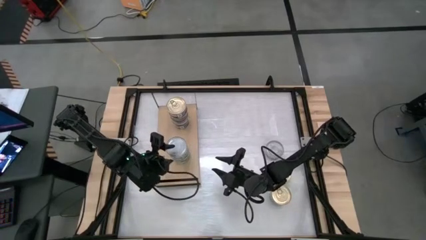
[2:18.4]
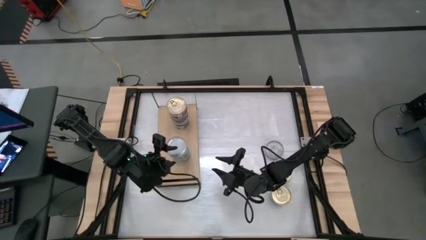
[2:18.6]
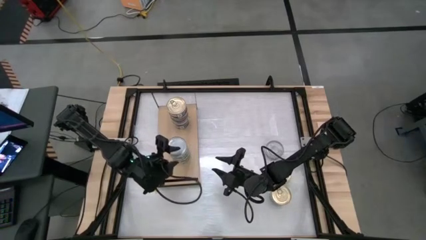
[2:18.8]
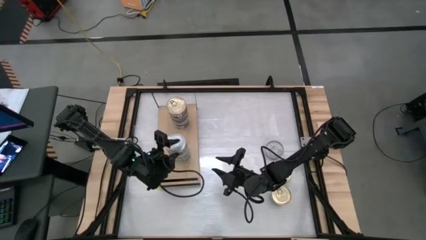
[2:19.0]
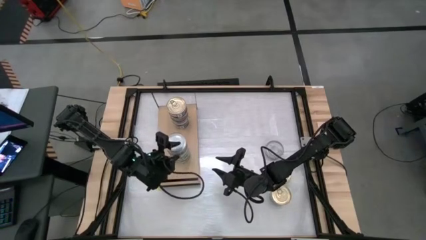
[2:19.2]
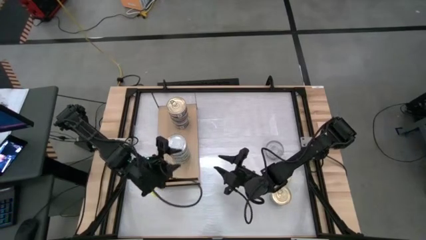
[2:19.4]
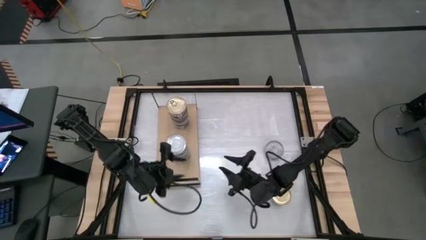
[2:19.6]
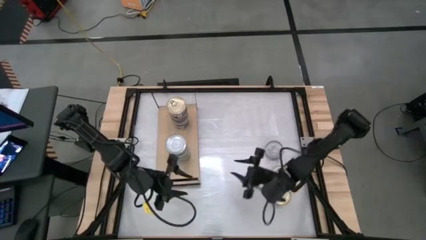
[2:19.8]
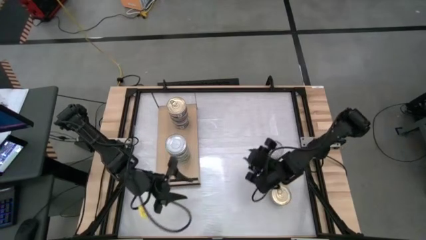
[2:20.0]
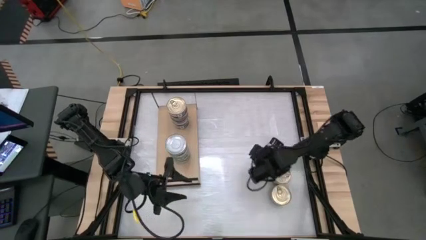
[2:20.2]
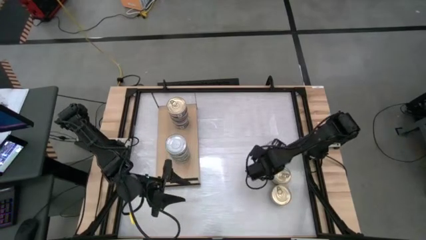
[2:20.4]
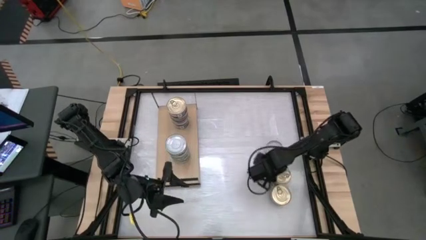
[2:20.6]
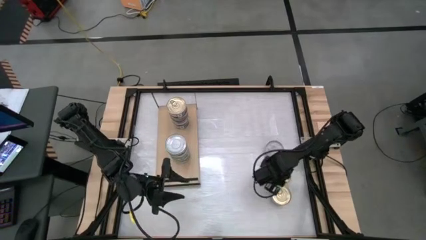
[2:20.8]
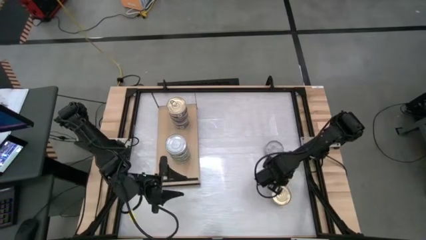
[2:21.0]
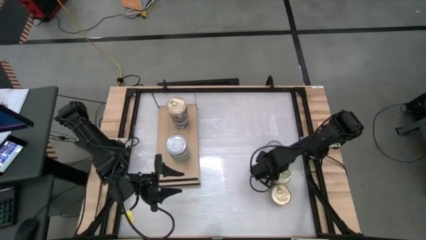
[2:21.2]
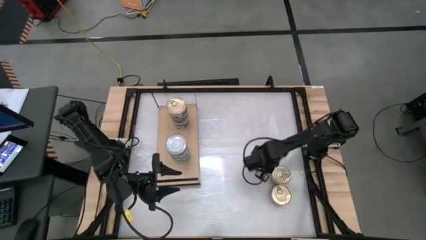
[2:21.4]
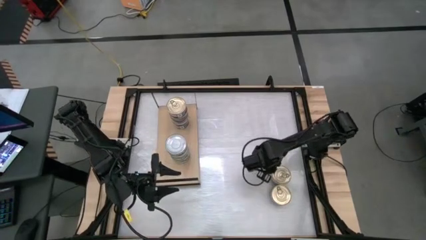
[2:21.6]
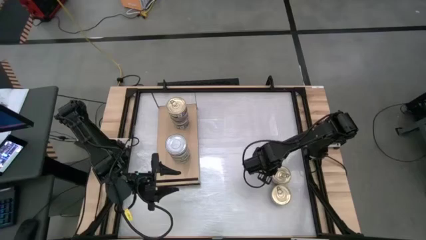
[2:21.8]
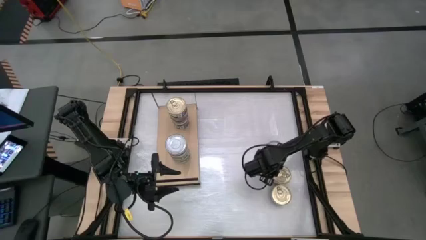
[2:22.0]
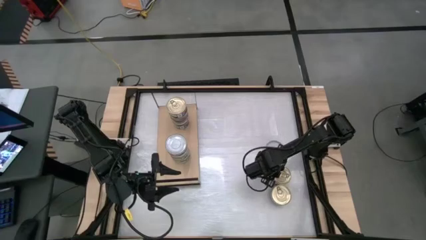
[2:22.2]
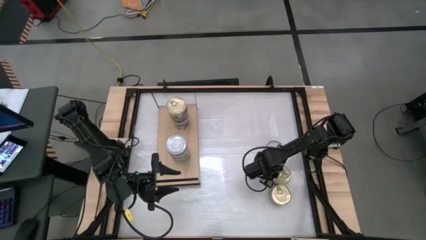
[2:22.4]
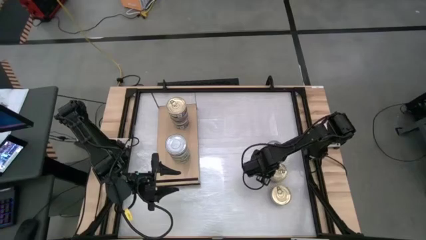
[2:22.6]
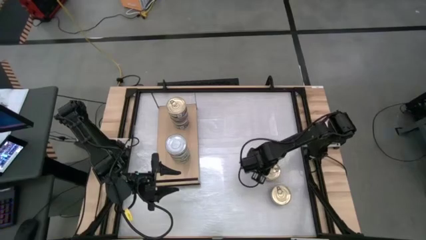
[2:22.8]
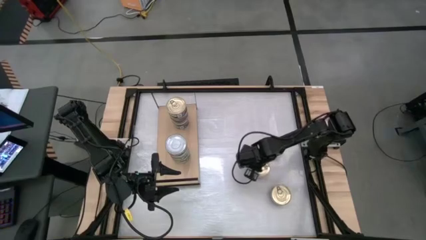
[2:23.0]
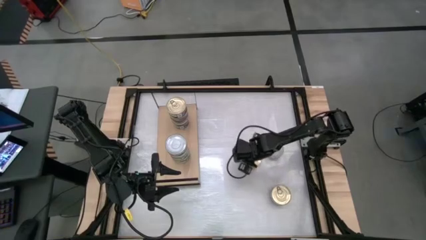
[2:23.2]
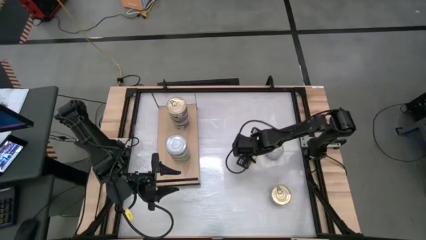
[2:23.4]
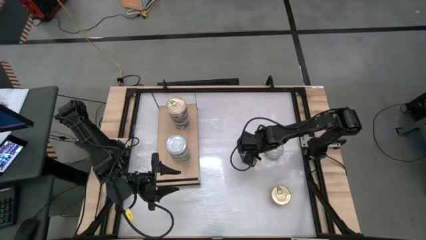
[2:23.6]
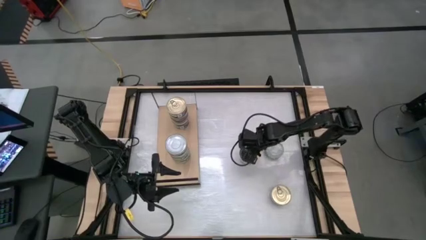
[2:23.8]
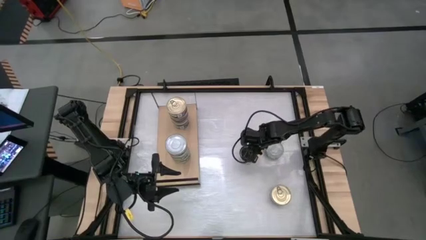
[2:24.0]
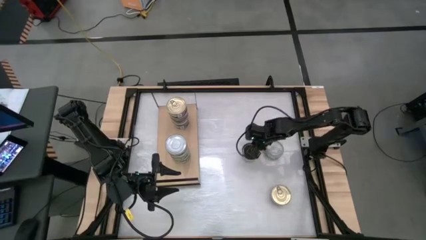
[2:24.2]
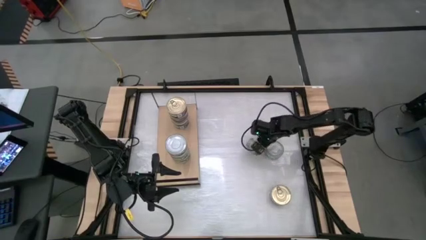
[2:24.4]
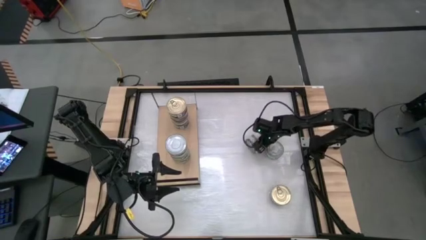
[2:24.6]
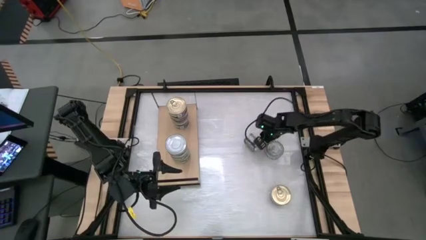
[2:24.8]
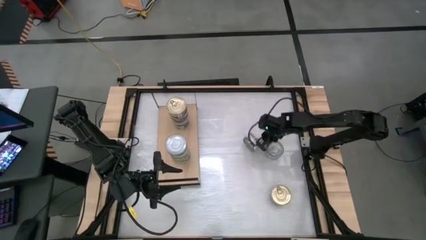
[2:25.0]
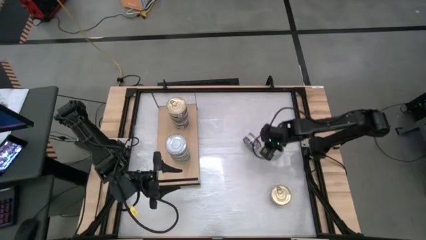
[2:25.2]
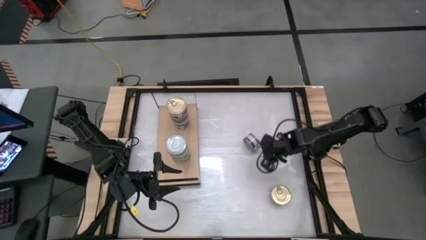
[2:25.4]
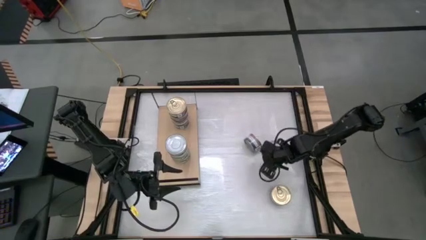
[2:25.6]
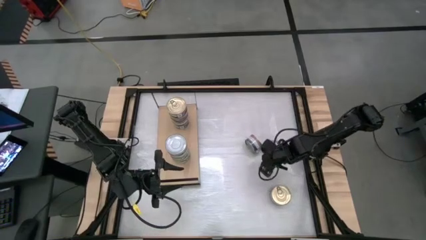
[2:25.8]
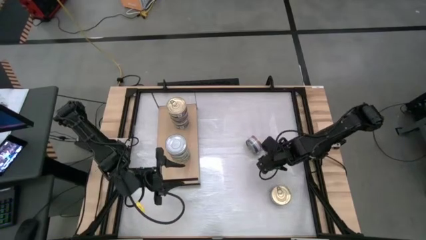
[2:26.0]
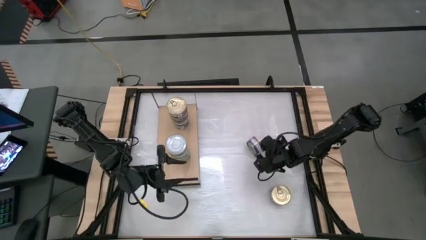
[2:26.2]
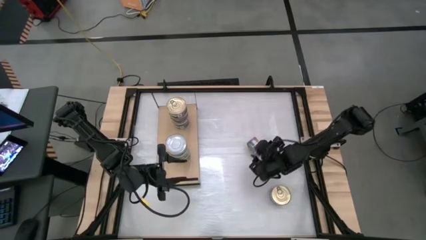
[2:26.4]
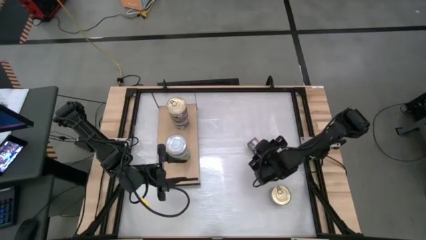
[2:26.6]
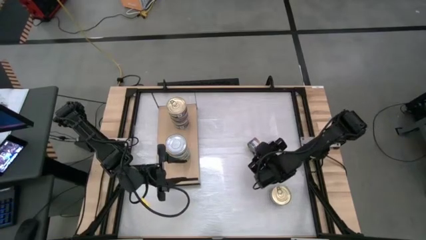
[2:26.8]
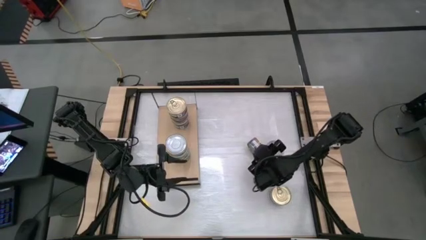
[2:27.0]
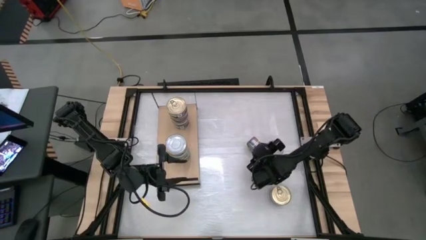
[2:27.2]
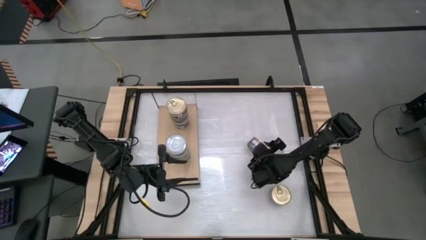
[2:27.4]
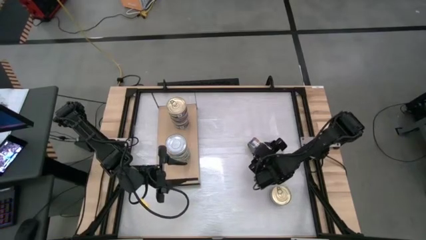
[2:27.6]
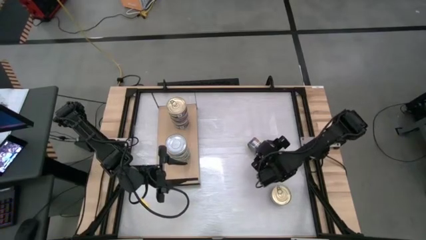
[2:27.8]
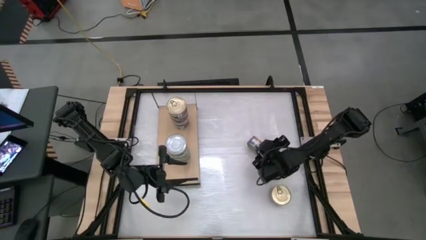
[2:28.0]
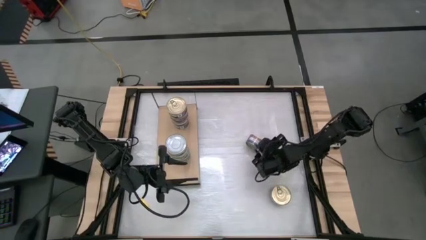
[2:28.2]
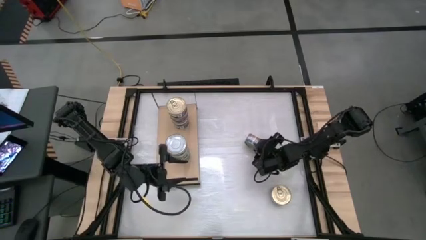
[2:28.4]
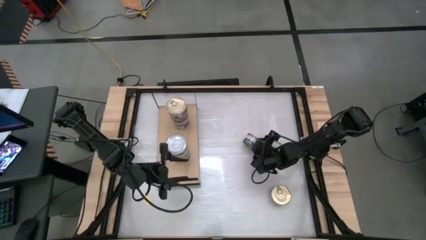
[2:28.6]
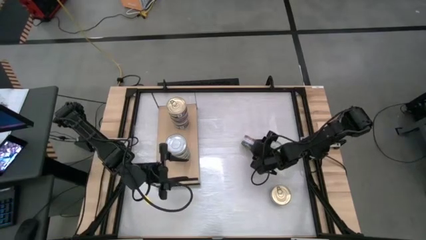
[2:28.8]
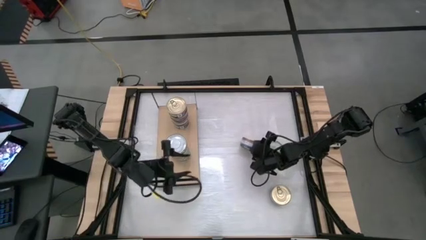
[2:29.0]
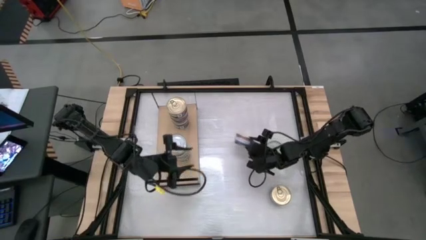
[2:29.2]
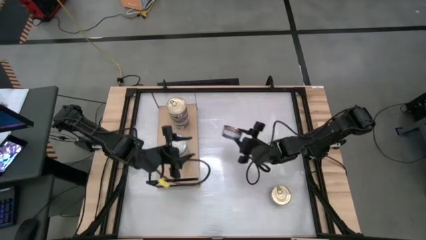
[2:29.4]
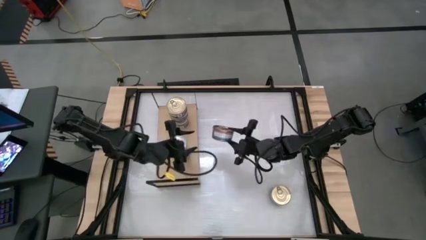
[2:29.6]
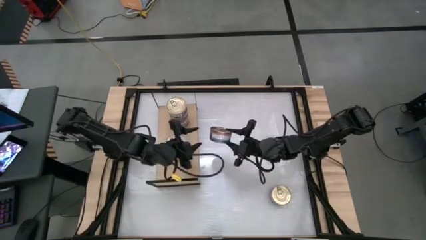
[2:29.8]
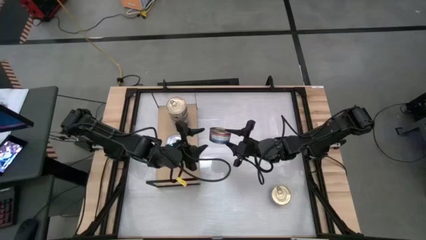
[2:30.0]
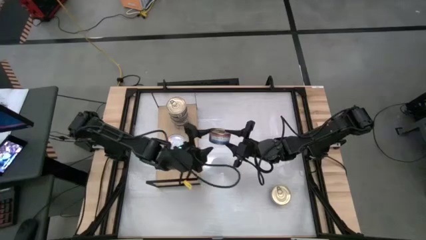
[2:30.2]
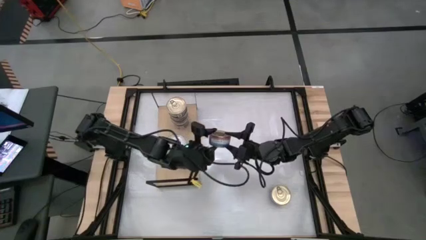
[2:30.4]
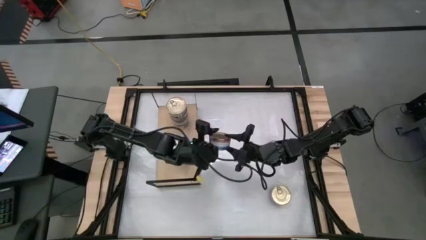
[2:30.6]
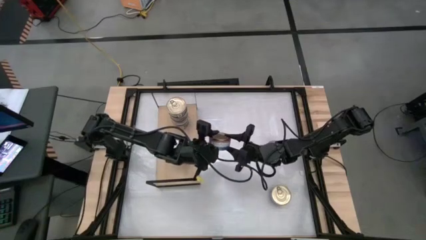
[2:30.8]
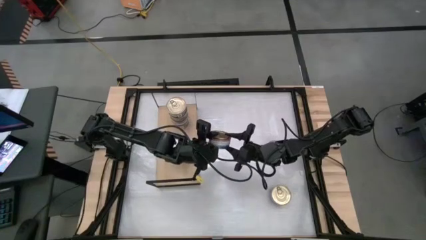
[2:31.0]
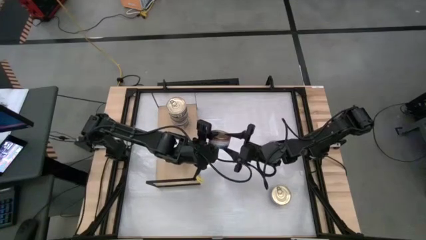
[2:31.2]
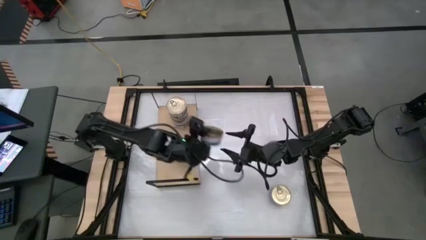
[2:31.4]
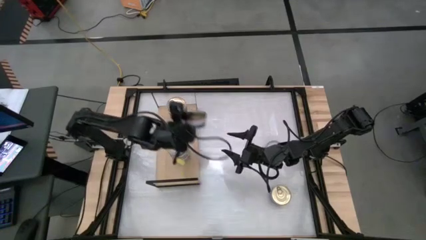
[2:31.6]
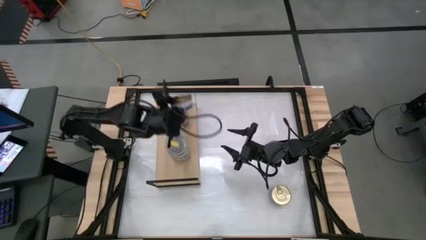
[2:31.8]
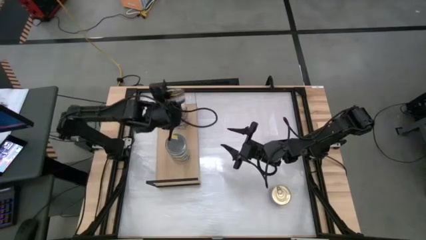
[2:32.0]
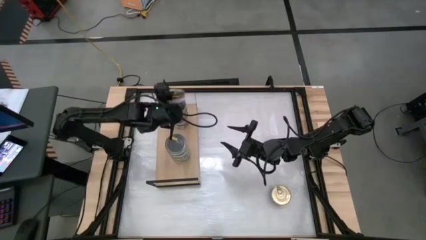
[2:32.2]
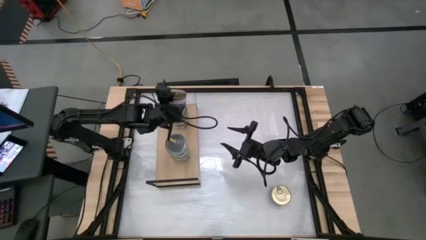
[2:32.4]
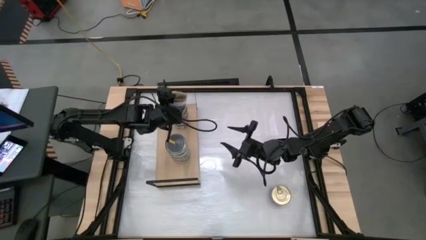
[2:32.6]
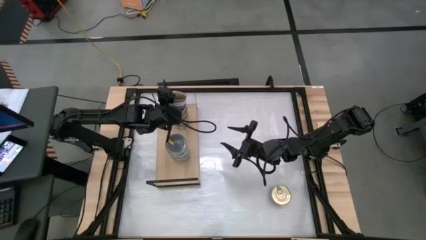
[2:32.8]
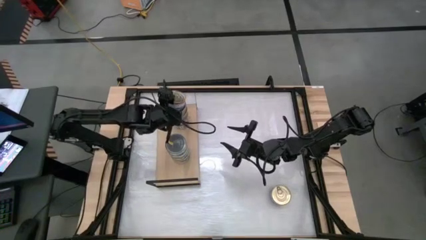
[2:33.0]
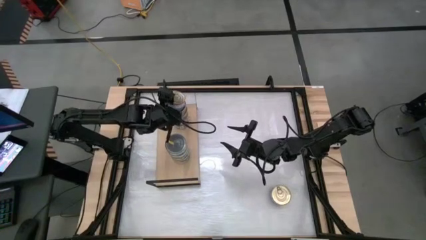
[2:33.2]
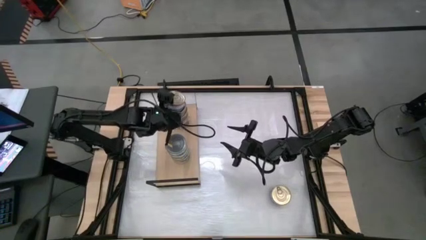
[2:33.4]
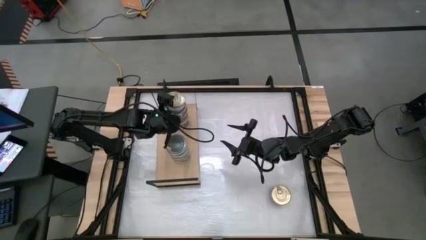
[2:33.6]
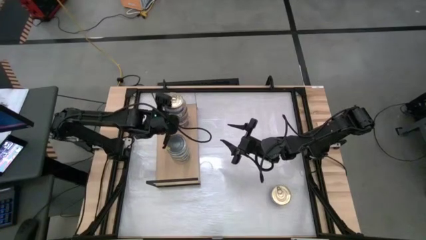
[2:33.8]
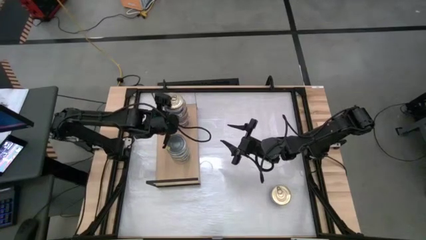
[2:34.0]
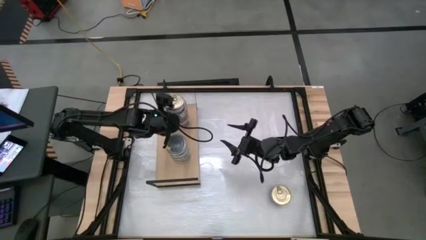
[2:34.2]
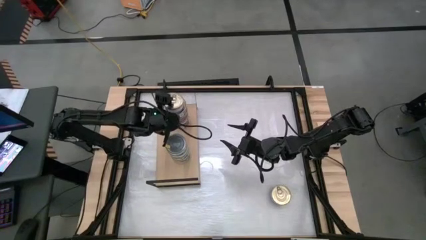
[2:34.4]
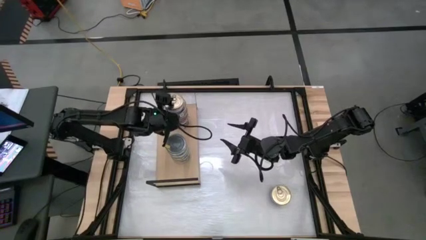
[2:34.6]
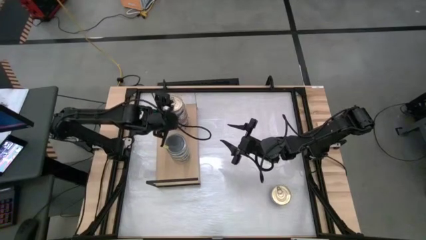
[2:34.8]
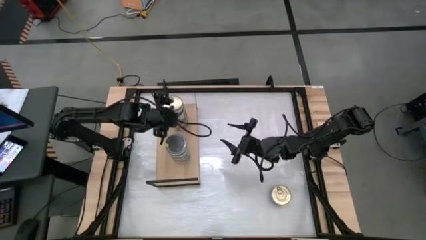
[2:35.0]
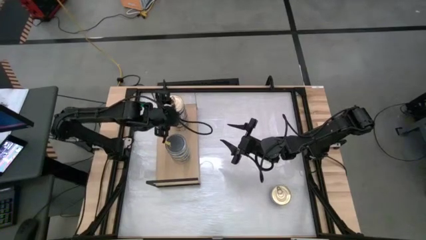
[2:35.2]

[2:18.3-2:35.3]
Task: Stack canned seafood by type on shelf
Stack the blue-pink tuna can on top of the other blue-pink tuna can on the shelf
